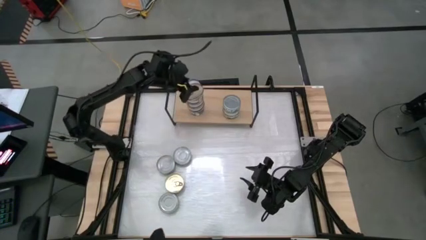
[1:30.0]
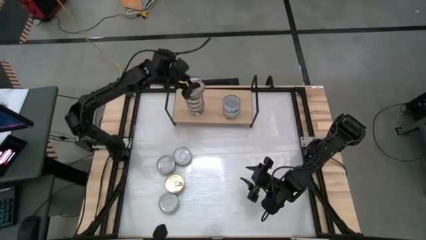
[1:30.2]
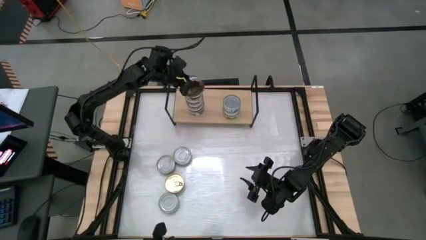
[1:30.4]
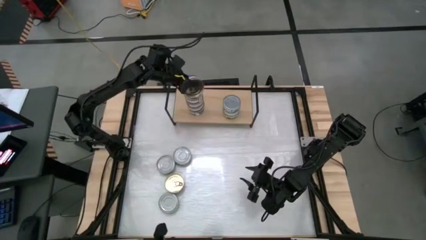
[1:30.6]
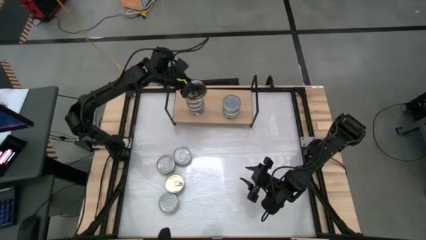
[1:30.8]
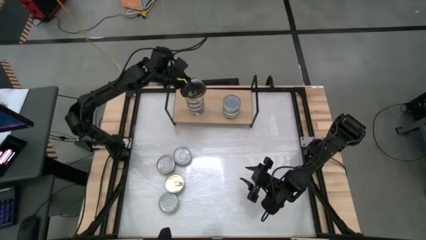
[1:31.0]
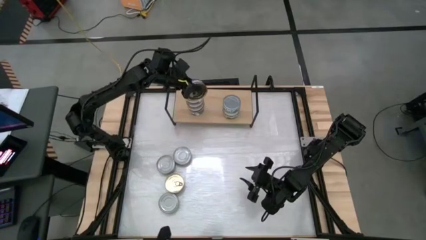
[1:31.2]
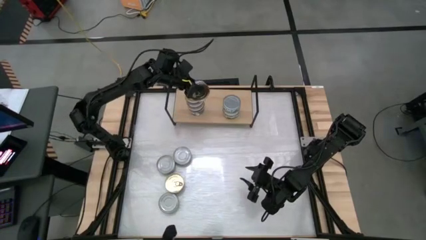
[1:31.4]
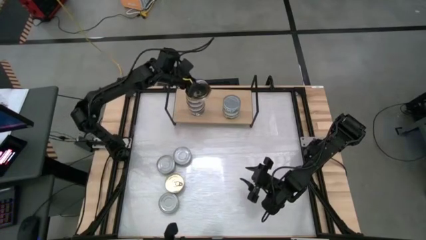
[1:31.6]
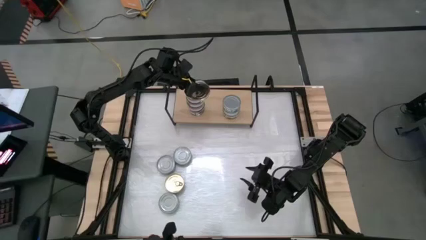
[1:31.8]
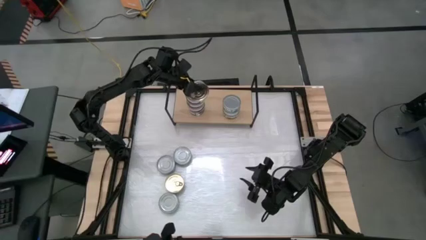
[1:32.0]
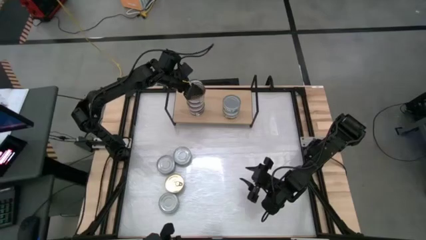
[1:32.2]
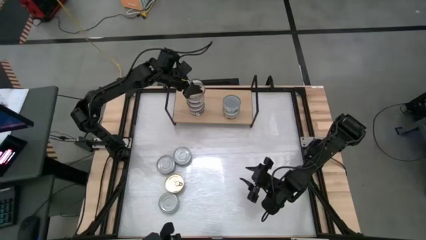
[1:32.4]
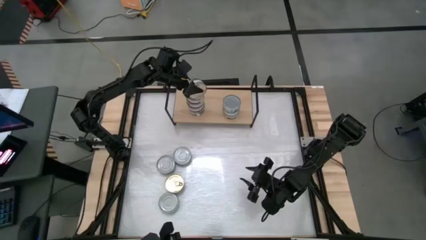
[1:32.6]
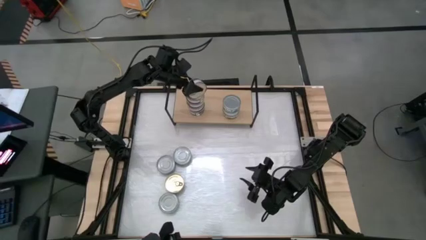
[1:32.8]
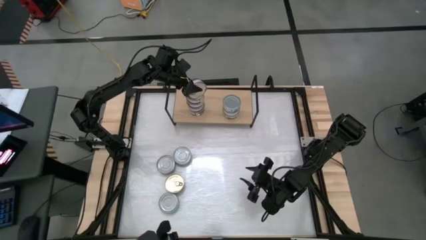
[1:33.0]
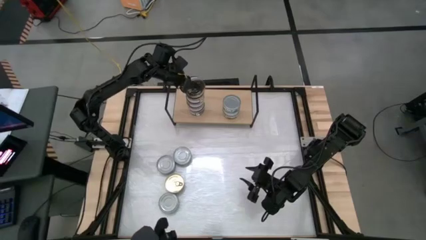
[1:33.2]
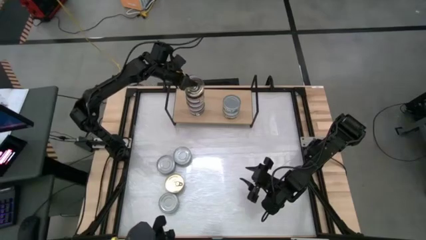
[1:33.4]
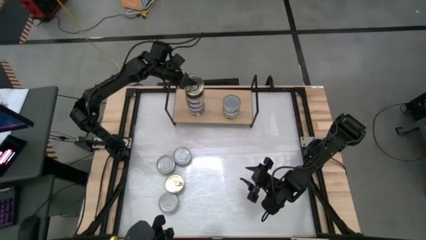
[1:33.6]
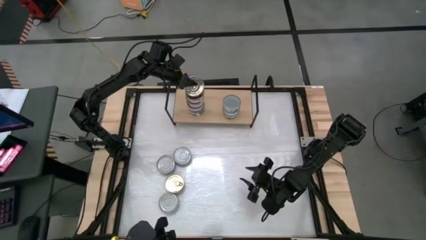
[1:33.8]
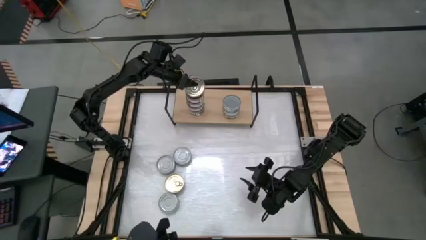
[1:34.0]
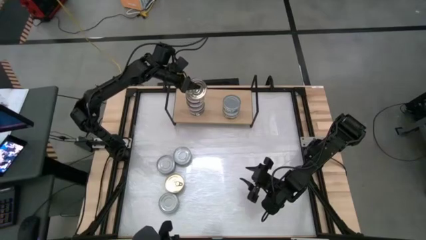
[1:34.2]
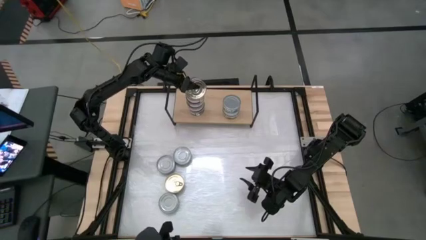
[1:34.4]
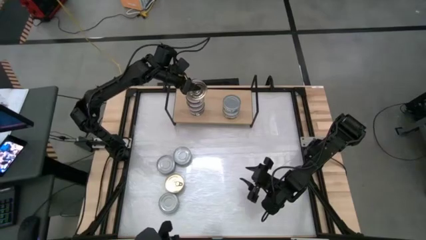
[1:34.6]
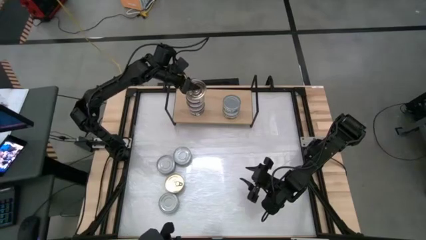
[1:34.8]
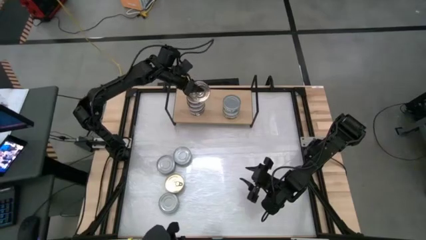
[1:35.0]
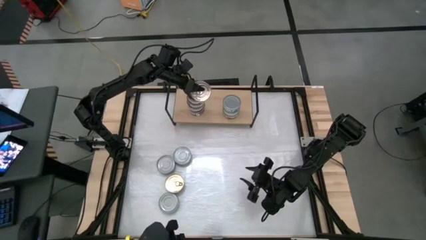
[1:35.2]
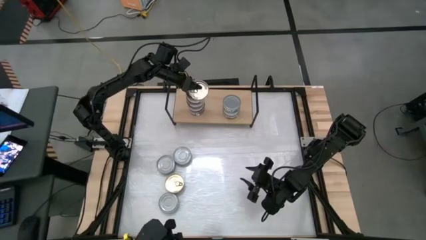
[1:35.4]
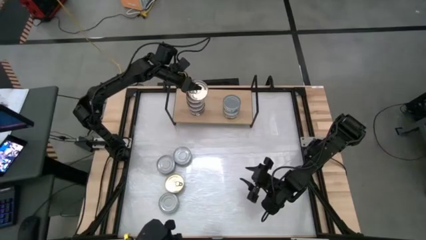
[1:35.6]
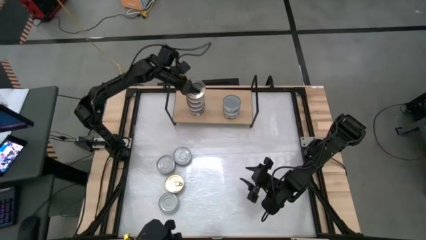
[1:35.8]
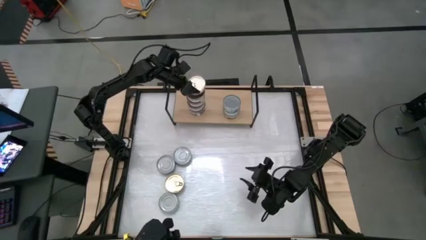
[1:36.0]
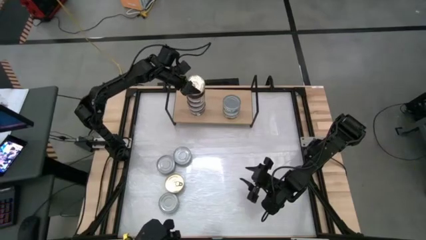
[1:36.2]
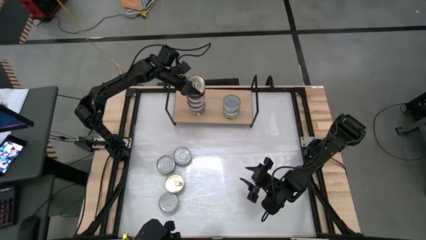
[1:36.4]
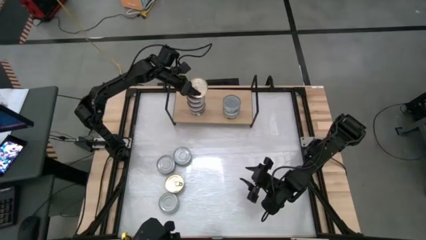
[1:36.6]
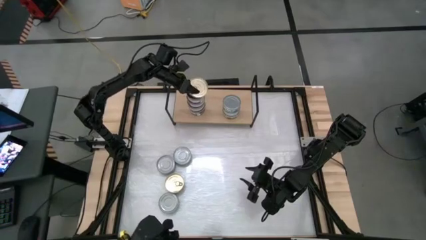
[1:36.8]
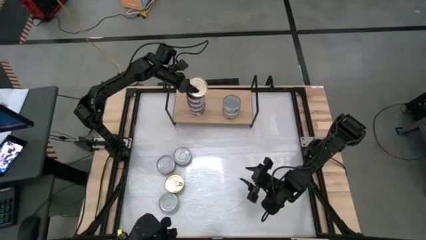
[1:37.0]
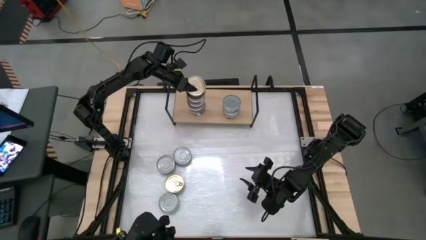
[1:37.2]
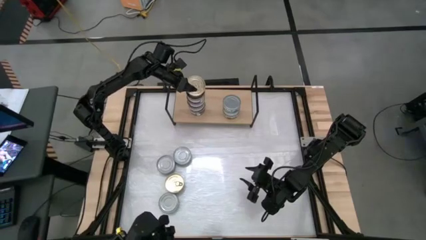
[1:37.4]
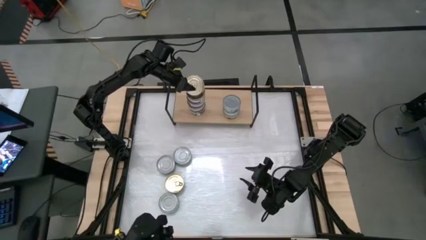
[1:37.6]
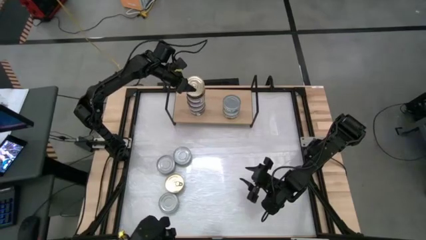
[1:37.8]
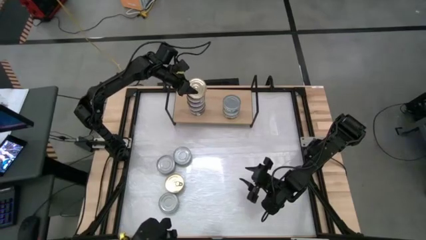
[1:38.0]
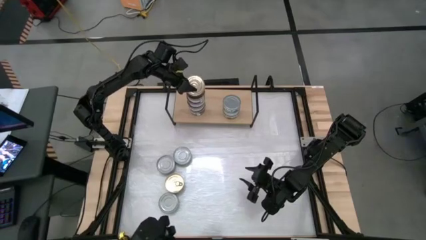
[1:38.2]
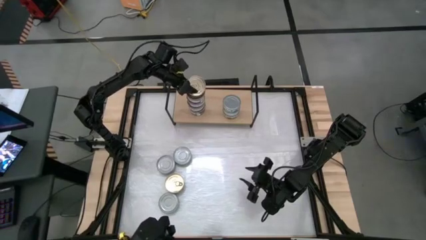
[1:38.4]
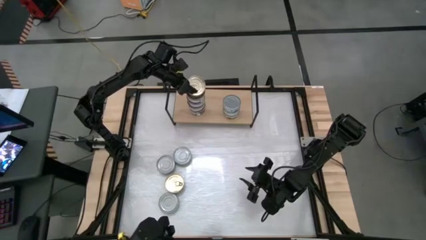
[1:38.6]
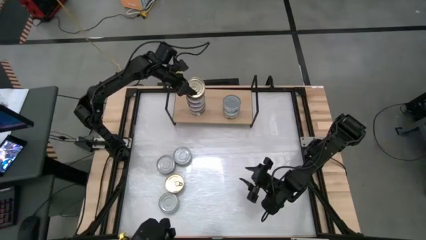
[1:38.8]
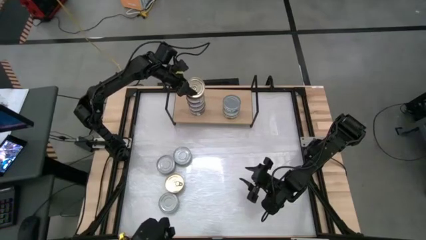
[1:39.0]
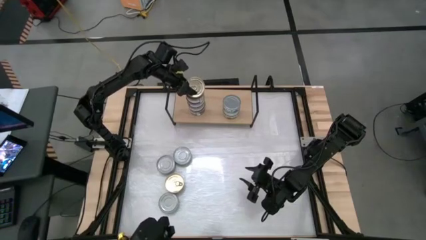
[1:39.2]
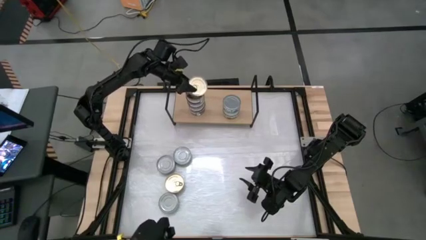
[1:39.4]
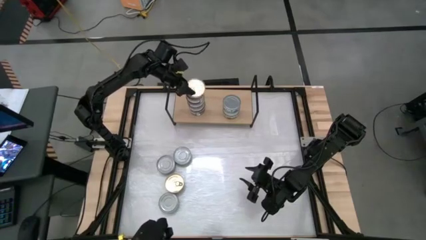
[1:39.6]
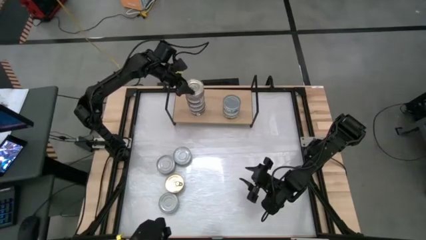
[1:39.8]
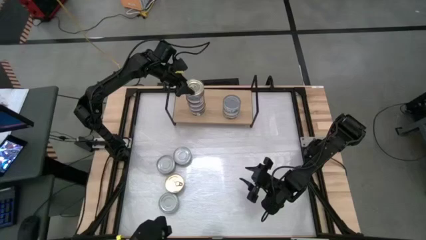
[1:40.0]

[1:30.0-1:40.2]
Task: Stack canned seafood by type on shelf
Stack the blue-pink tuna can on top of the other blue-pink tuna can on the shelf

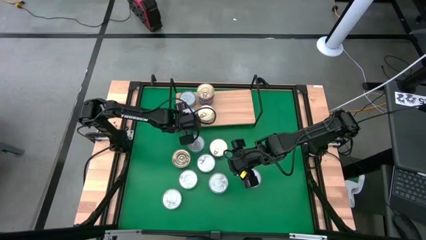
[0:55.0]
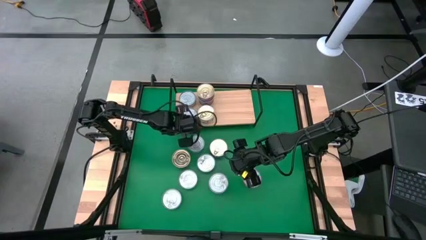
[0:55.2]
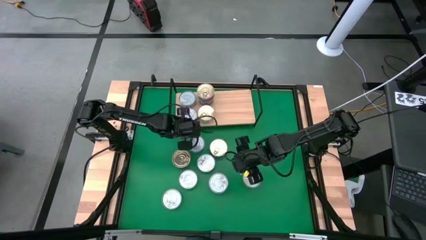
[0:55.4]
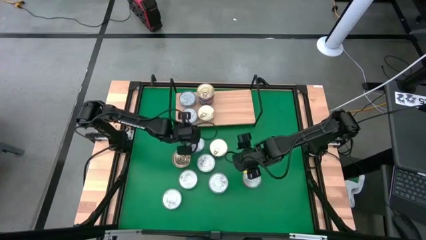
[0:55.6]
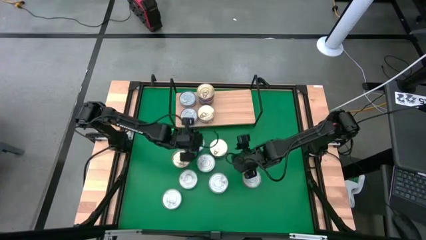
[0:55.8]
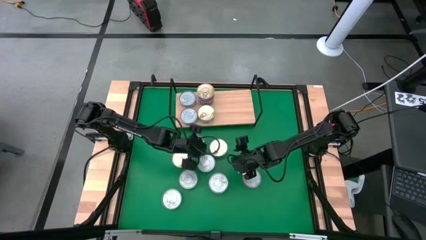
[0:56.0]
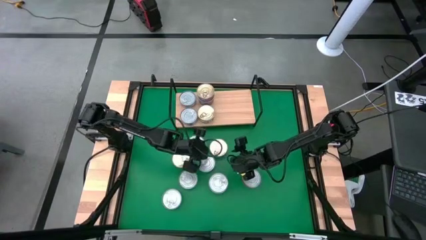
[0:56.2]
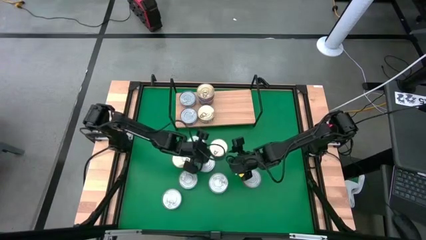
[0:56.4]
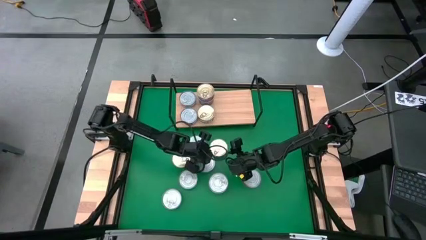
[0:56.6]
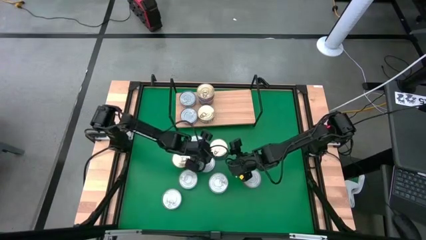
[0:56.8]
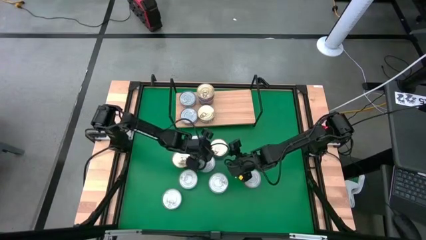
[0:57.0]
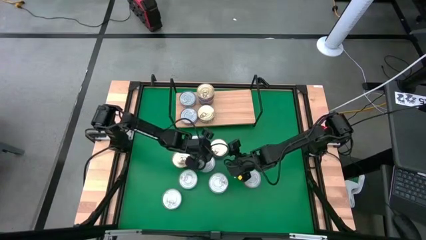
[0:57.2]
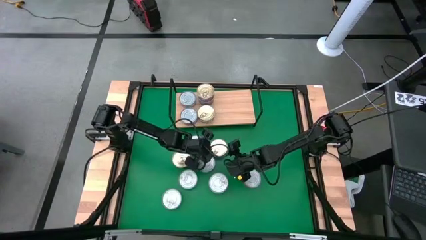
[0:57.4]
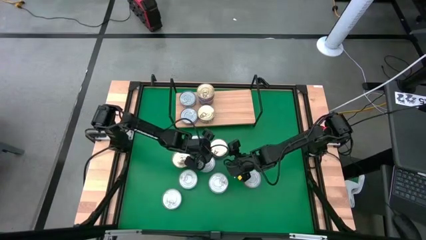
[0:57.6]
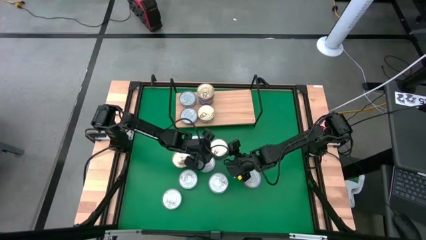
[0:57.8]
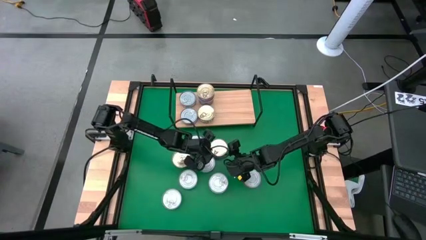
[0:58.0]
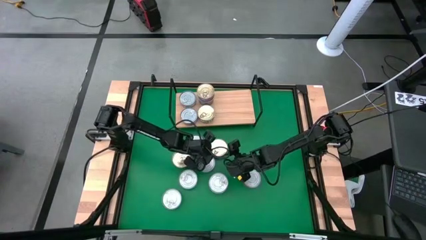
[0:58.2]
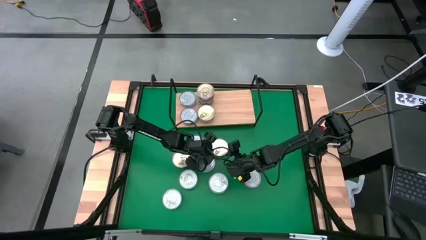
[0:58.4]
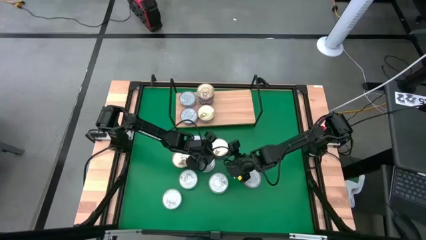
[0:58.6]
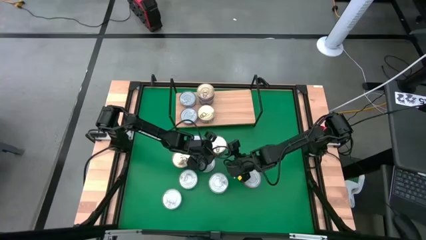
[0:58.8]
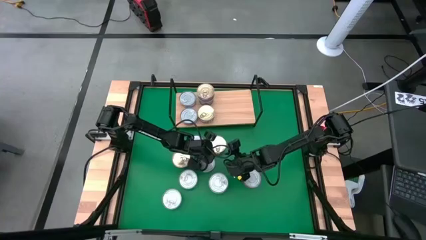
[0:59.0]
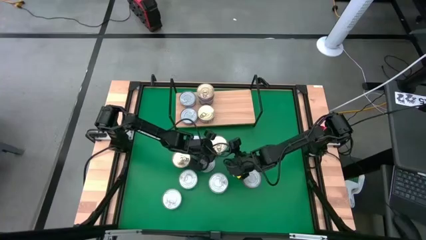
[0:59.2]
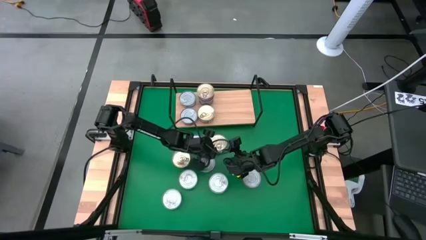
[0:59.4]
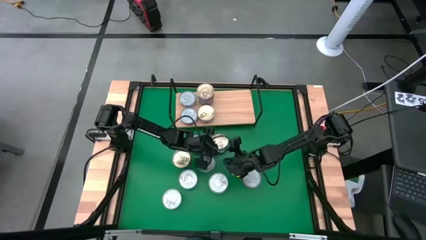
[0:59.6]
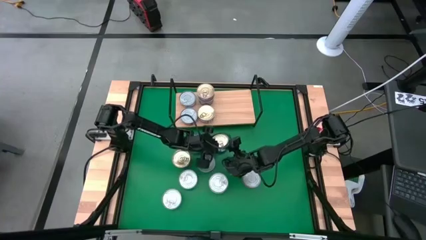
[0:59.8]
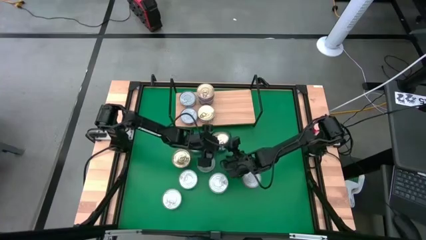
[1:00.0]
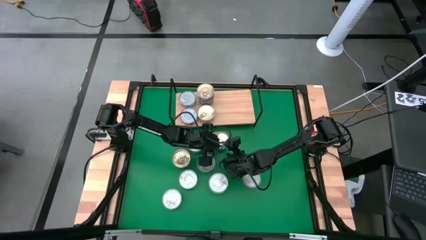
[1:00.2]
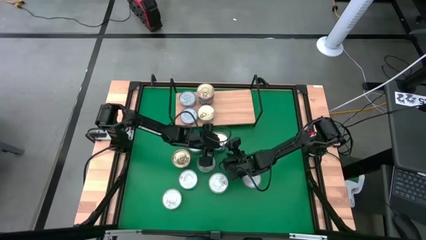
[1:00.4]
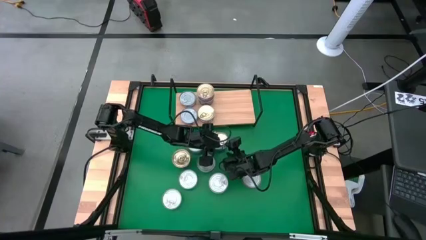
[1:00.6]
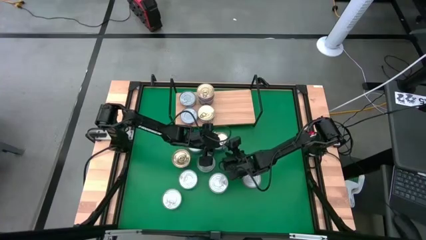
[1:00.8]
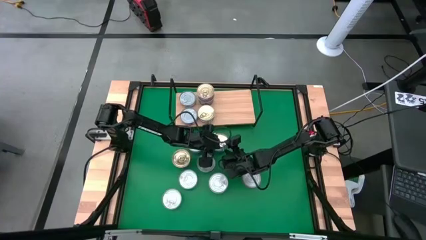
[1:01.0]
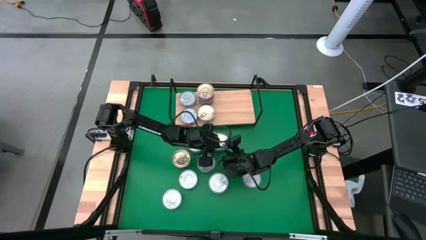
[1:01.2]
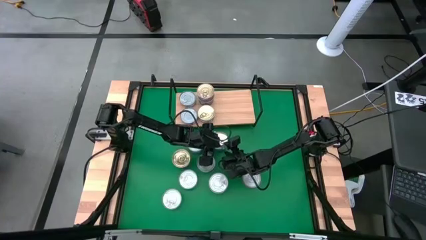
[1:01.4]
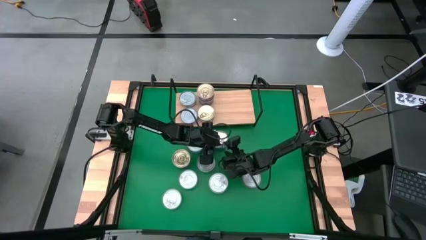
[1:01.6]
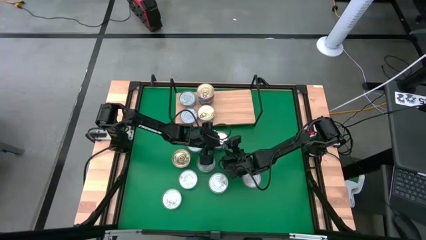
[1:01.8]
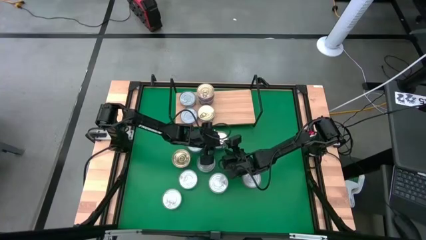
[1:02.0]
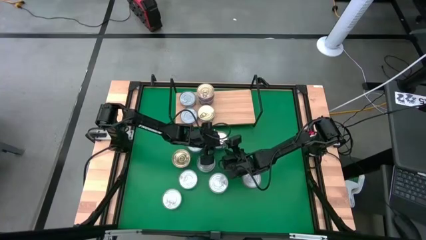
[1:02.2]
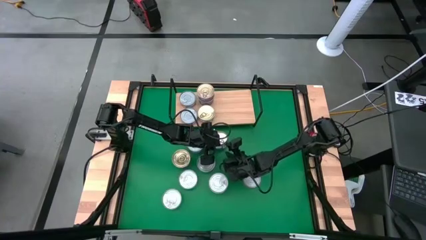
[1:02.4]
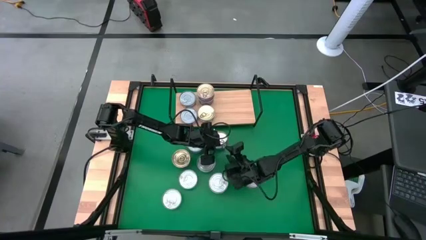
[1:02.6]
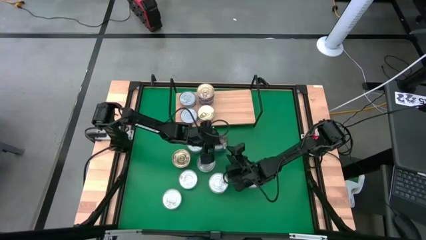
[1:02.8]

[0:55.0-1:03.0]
Task: Stack canned seafood by type on shelf
Stack the blue-pink tuna can on top of the blue-pink tuna can on the shelf
